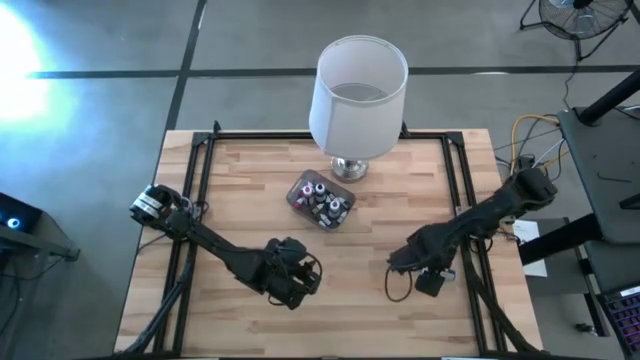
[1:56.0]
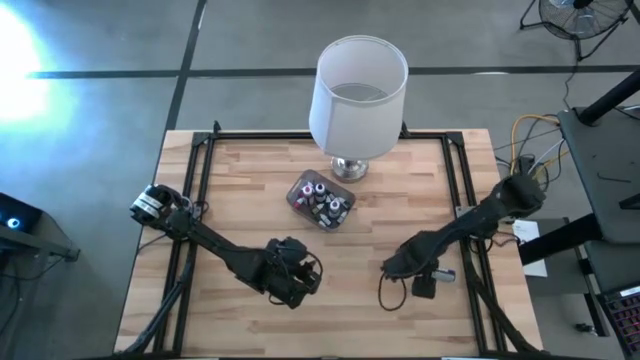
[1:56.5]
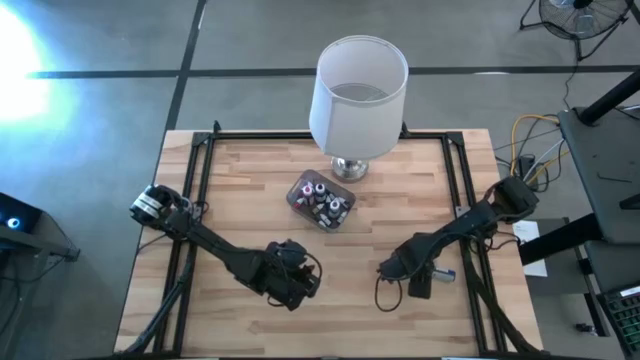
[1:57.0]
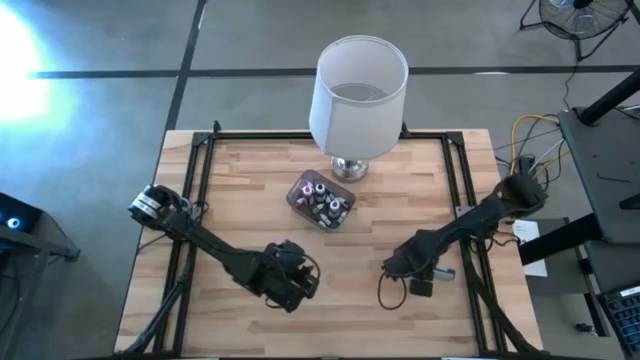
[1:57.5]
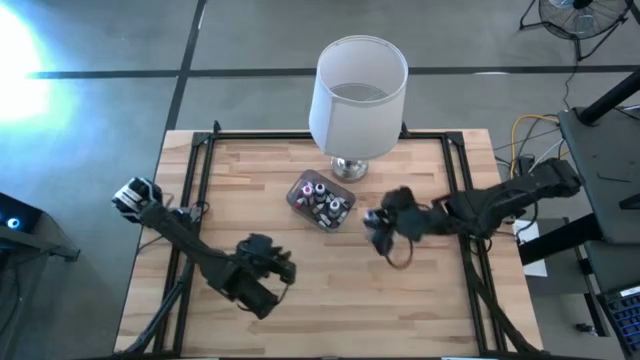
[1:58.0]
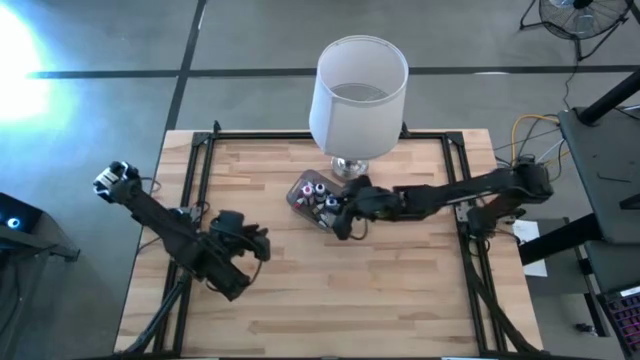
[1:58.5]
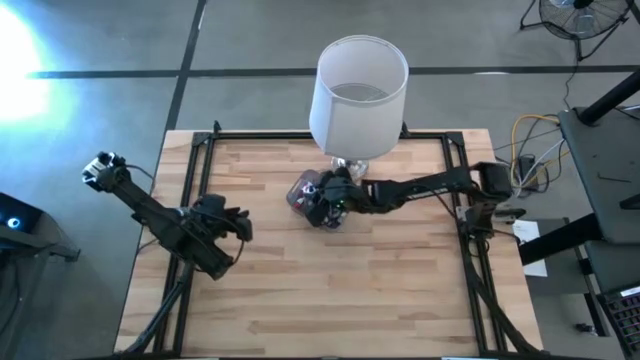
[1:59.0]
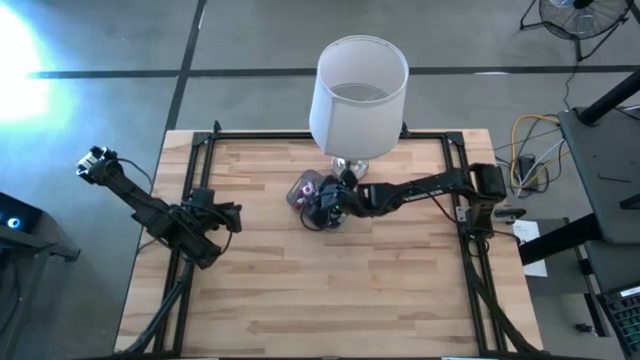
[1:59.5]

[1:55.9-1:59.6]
Task: Pick & Place food coloring
Put the large blue food coloring into the black bin

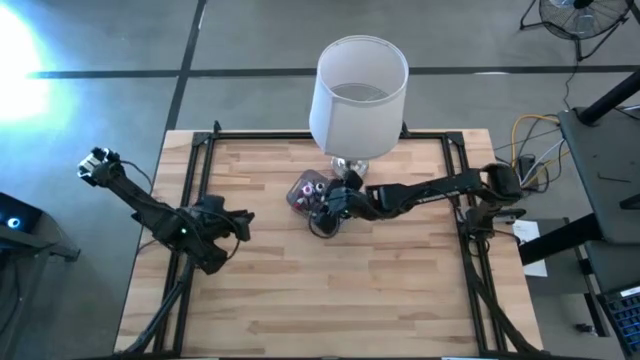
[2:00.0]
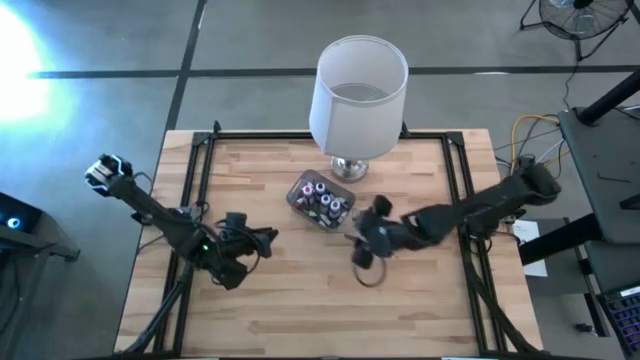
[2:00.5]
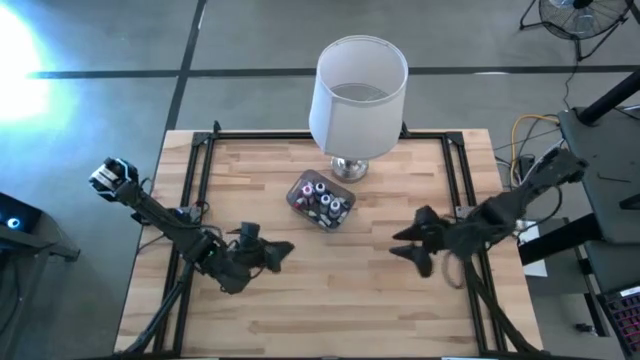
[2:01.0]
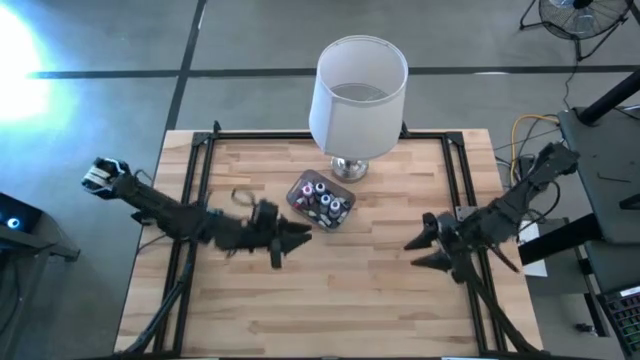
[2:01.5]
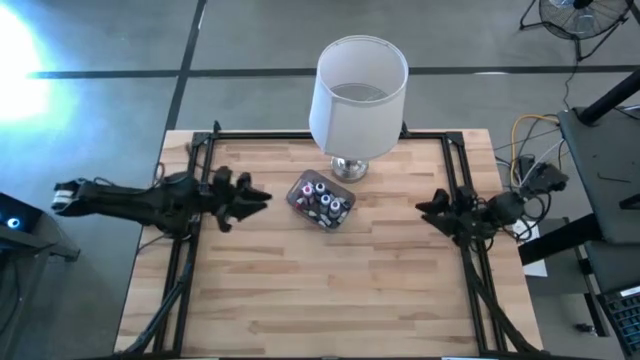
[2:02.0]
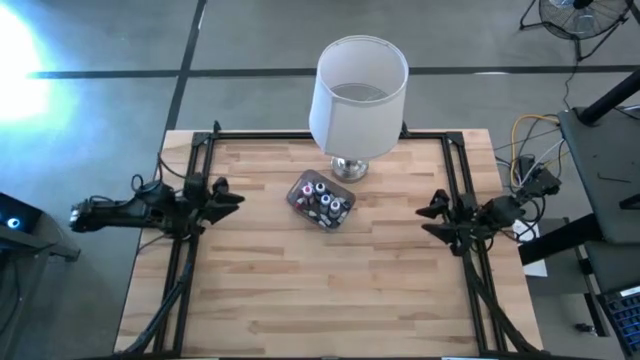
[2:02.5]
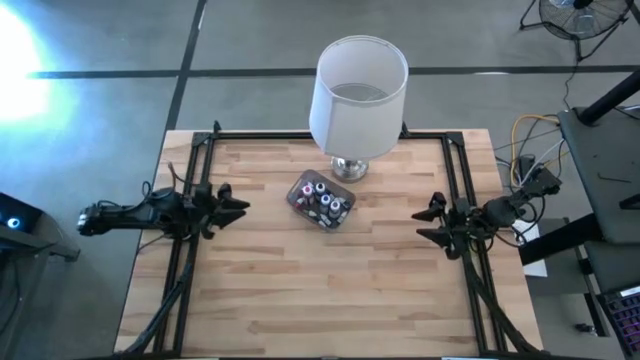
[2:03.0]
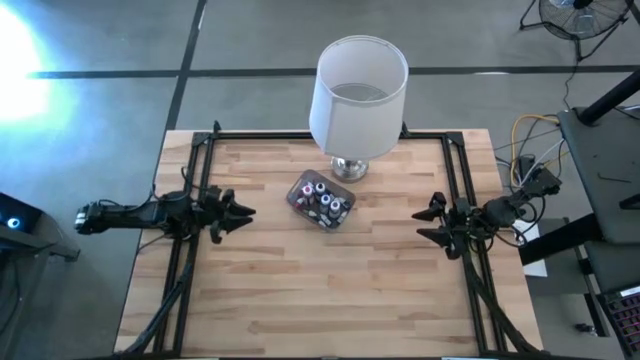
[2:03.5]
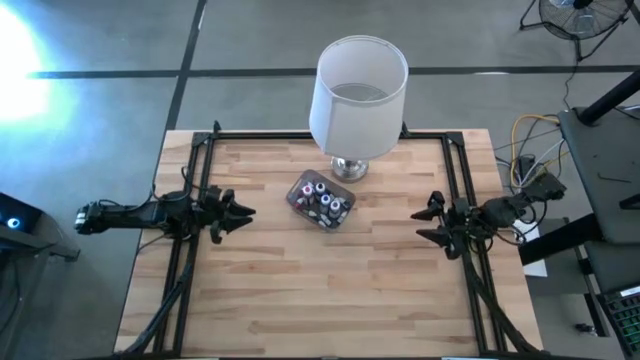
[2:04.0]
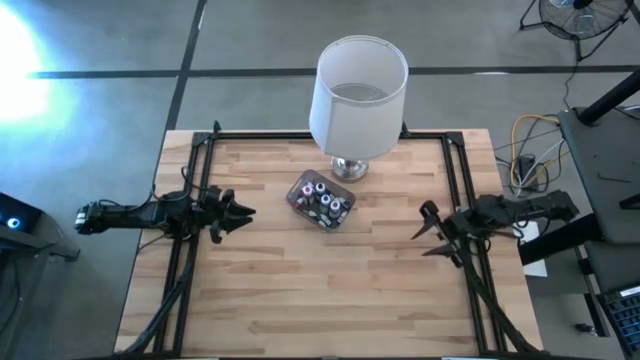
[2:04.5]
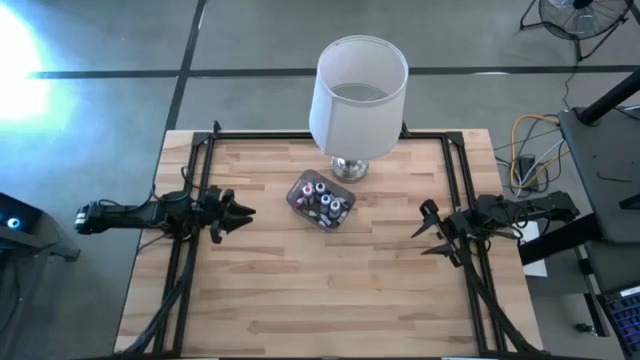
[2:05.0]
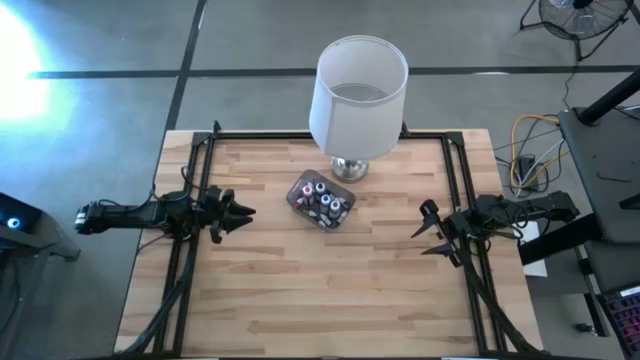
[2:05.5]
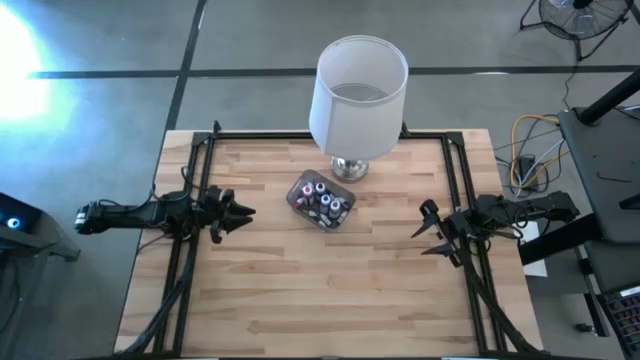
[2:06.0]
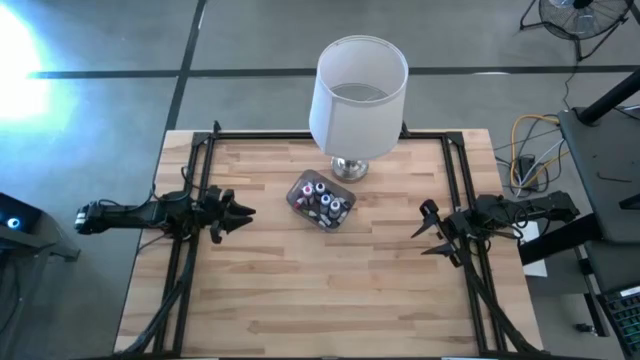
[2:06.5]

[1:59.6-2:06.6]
Return to Home Position

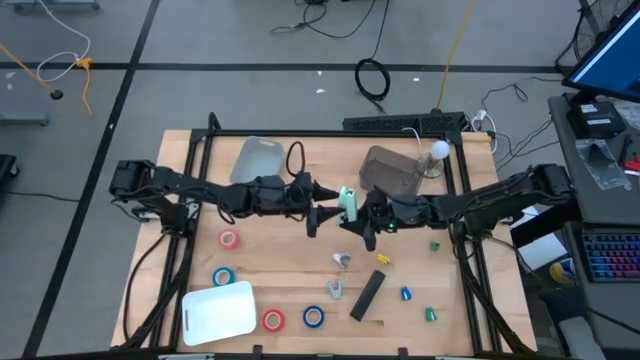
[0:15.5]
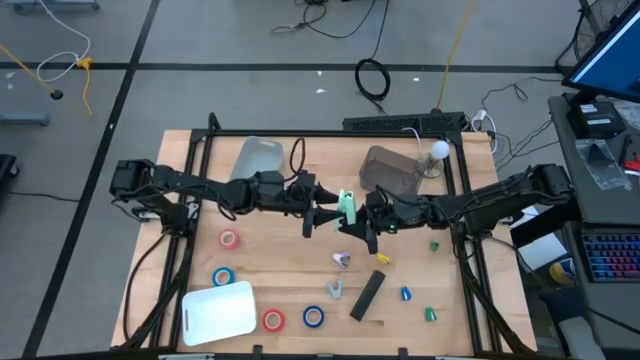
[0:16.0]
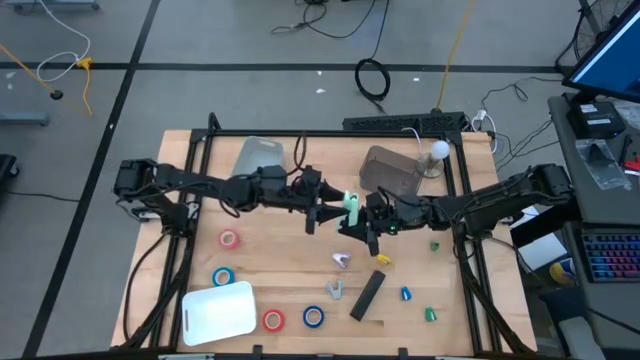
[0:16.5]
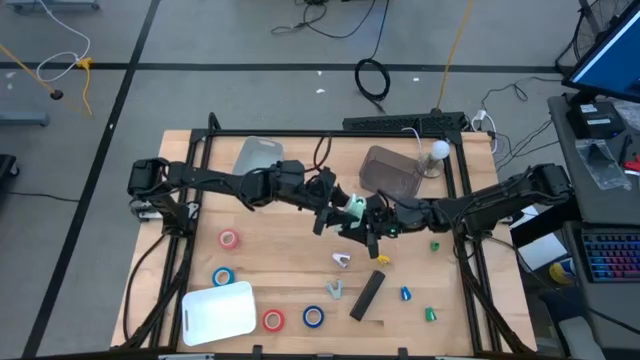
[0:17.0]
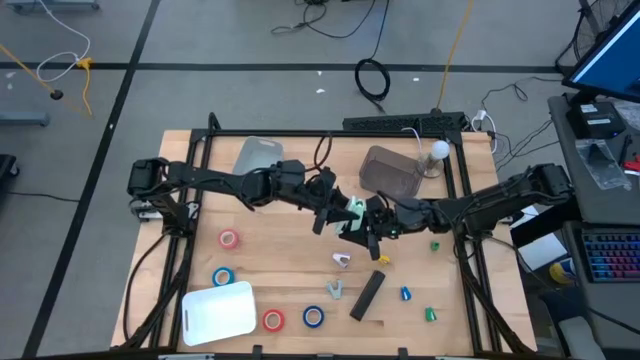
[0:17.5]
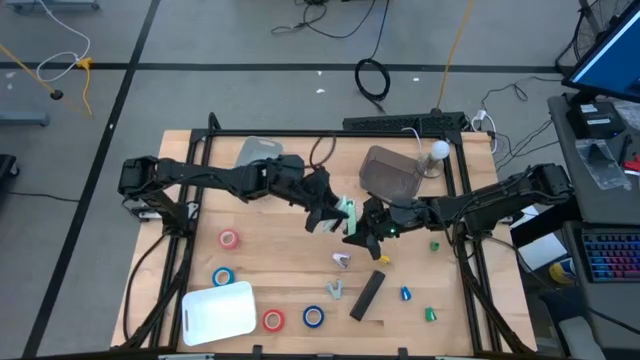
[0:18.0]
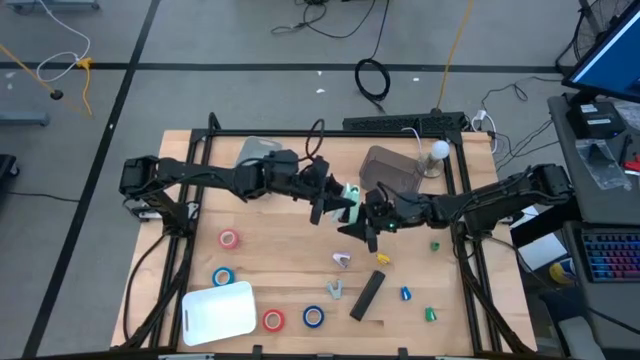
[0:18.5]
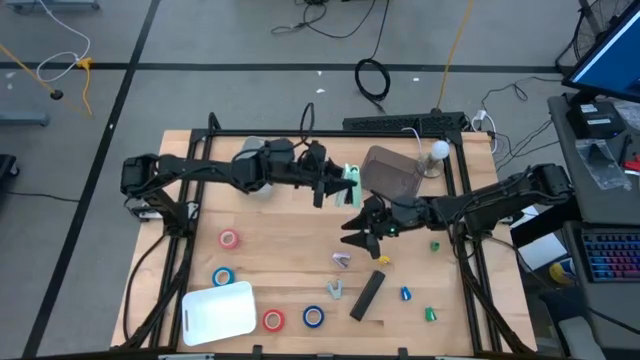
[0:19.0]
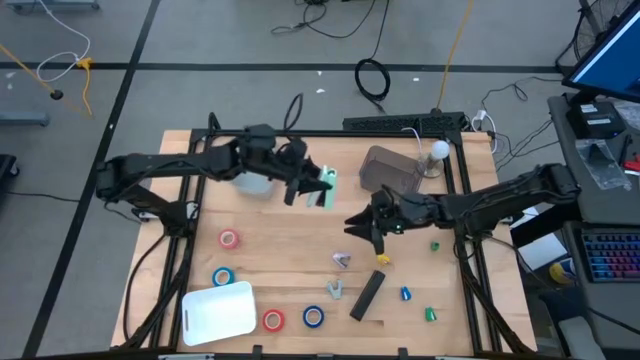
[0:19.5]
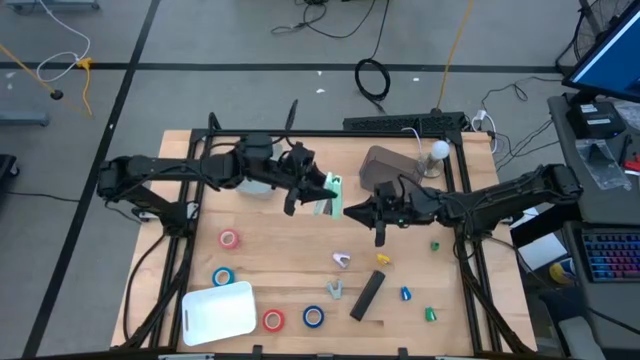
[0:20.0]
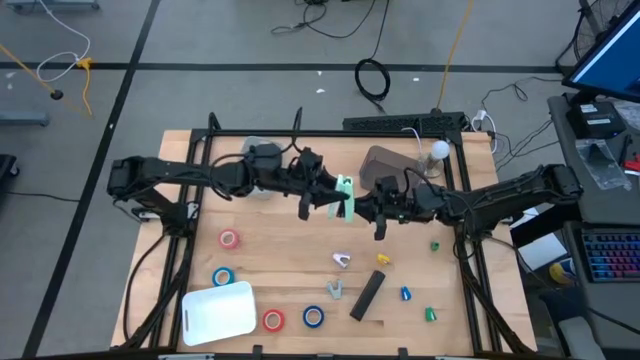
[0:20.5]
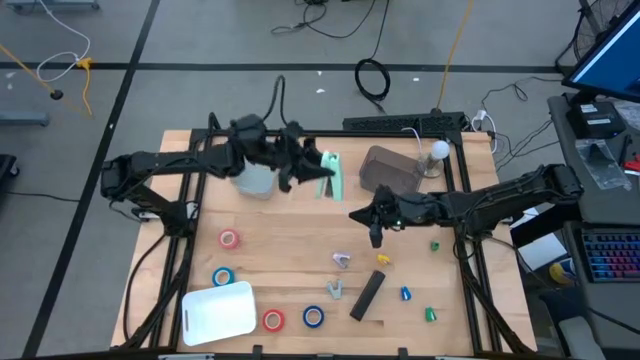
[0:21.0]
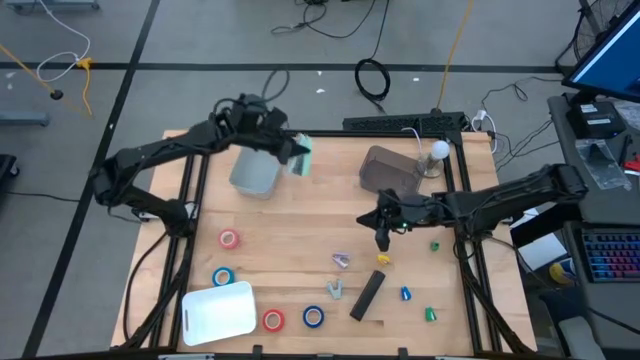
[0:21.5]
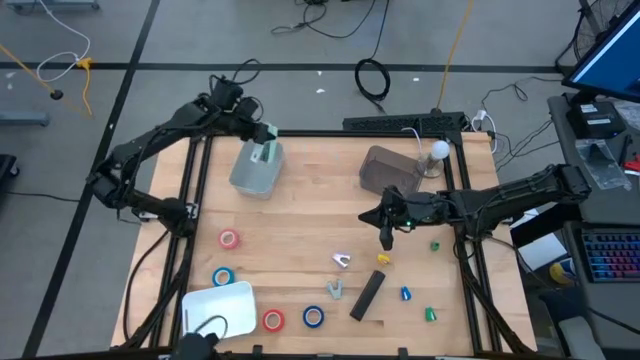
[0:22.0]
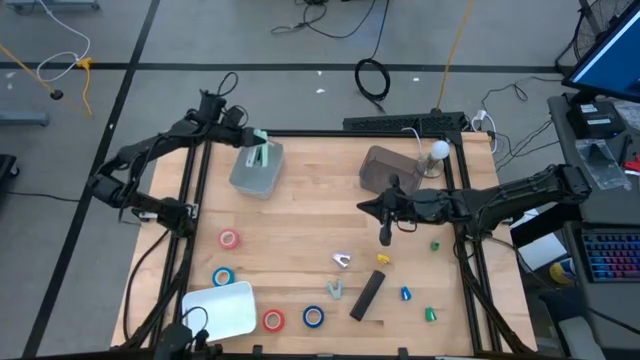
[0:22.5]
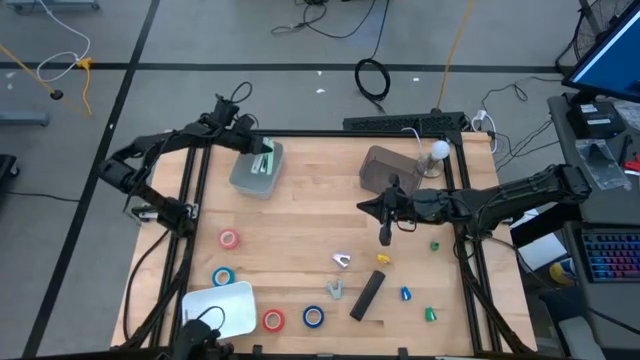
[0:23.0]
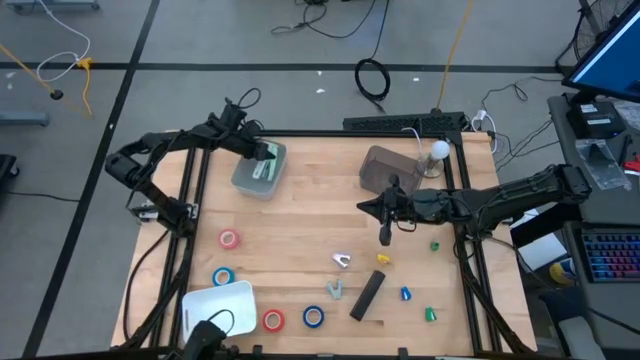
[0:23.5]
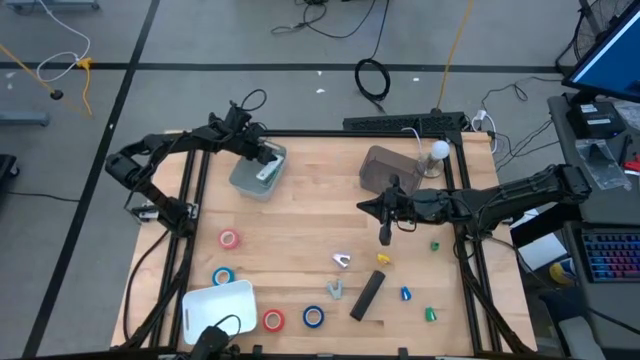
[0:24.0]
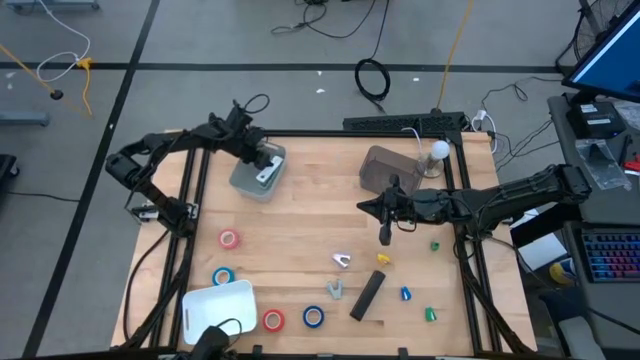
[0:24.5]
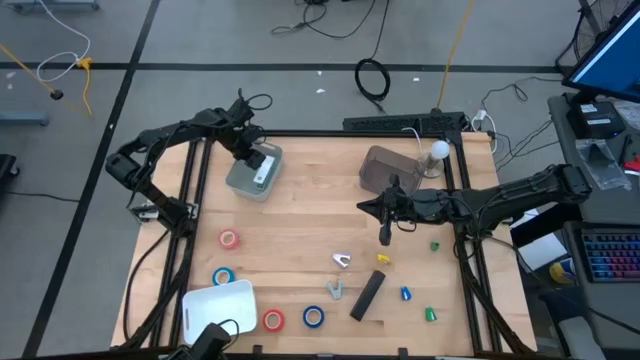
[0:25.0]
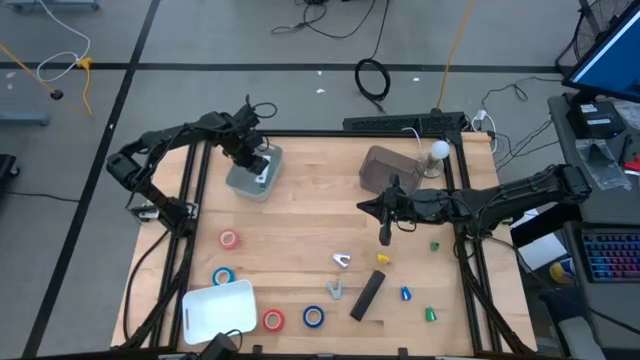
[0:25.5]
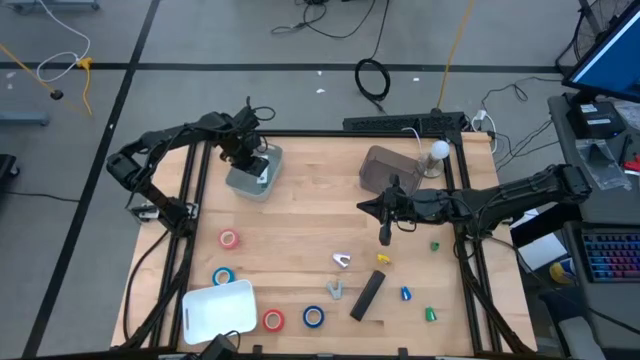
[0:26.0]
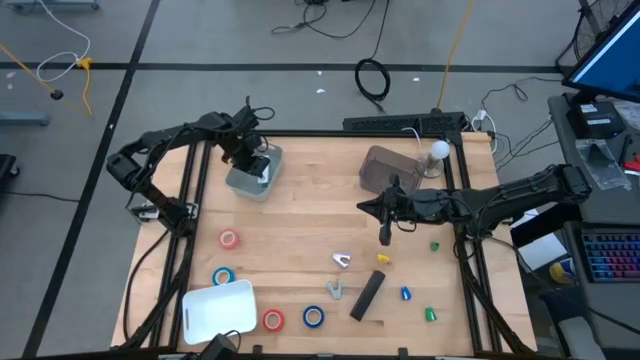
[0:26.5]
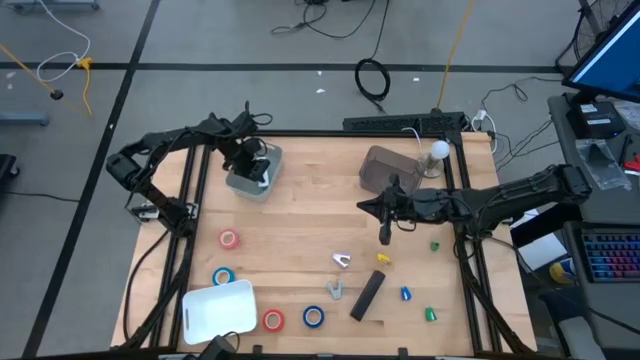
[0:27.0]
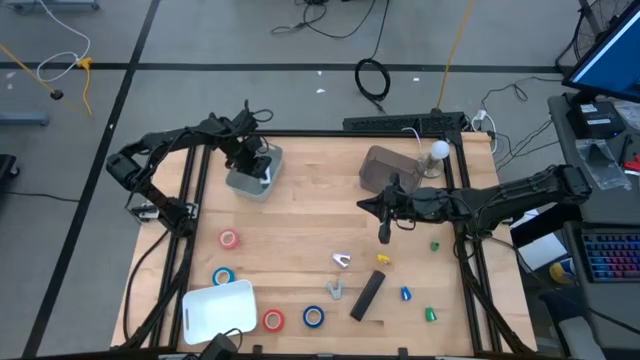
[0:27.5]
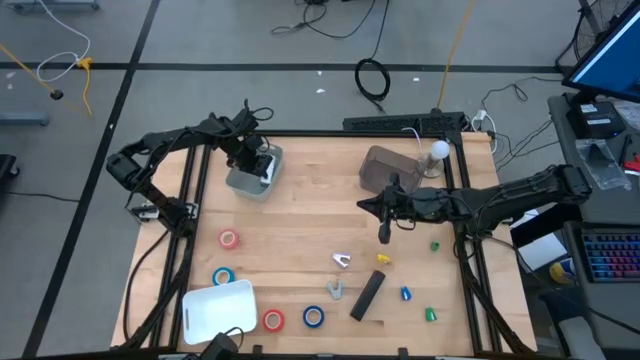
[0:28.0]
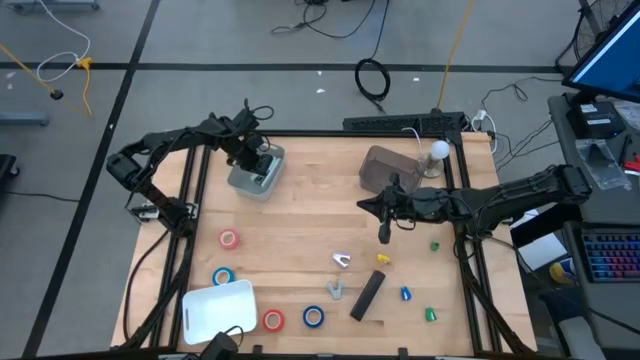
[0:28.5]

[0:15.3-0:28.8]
Task: Pick and place Stapler, Stapler remover, tape
Put the green stapler into the gray bin
